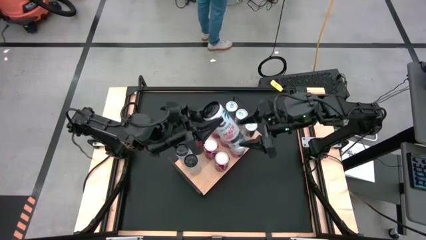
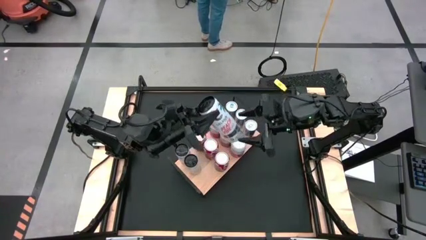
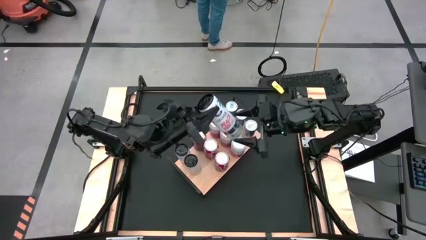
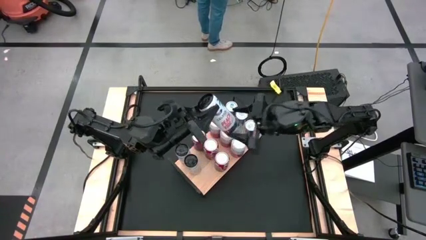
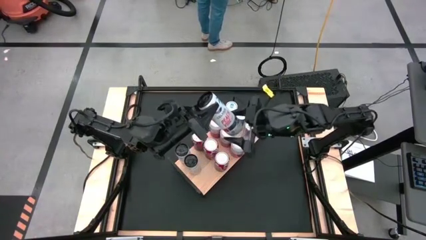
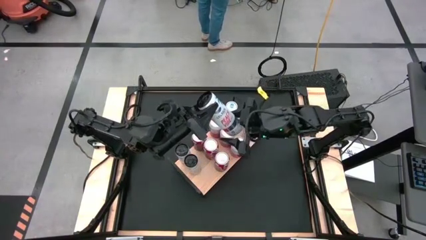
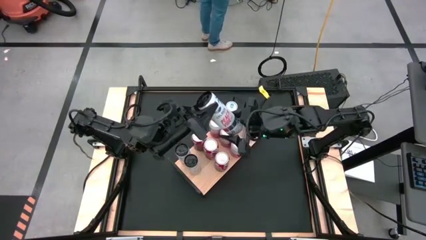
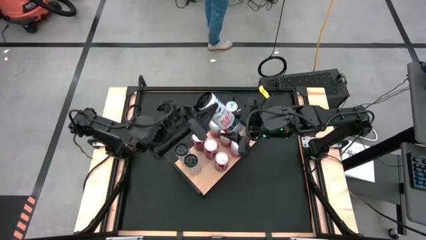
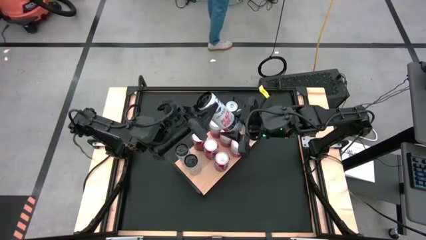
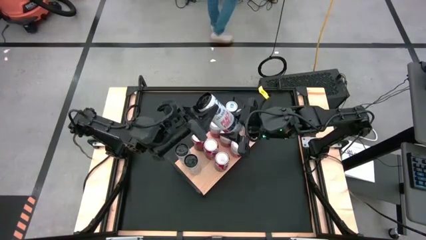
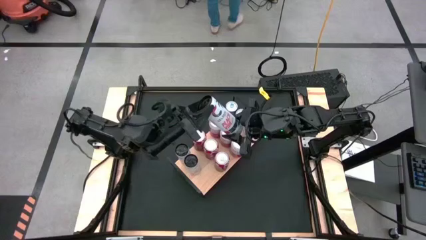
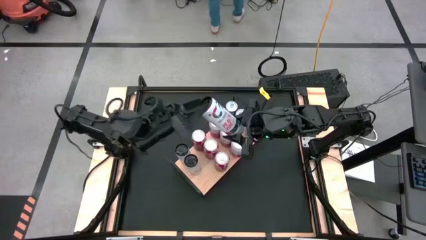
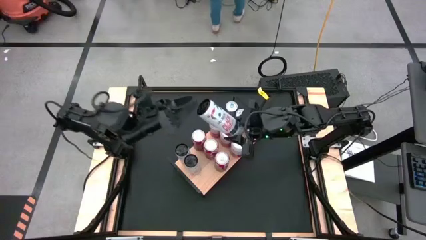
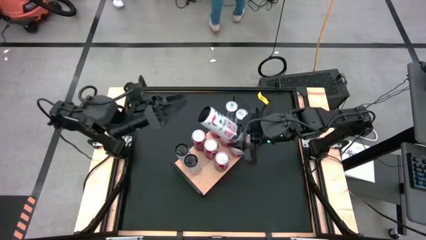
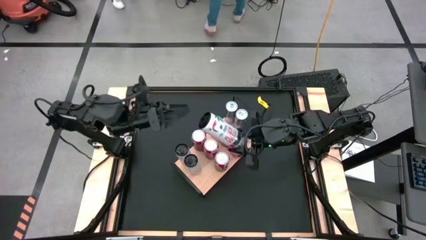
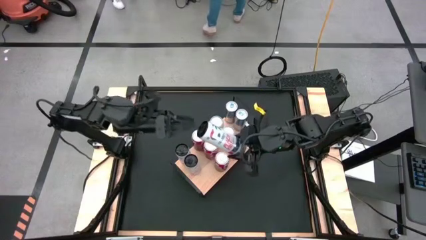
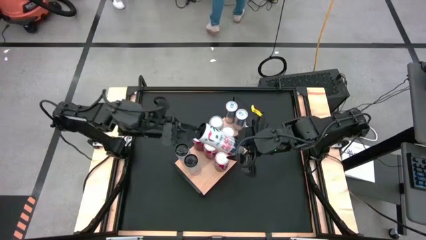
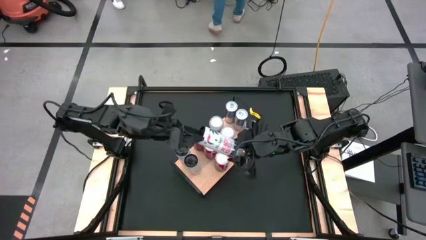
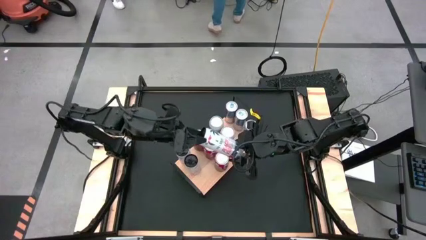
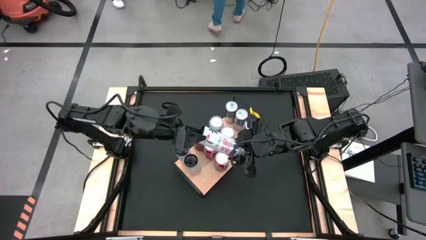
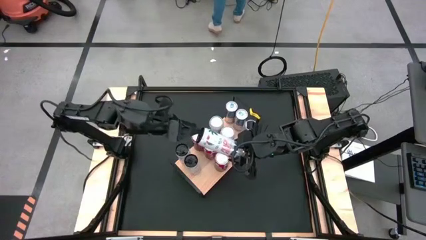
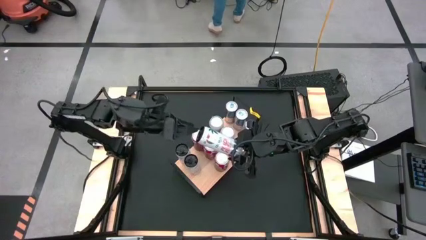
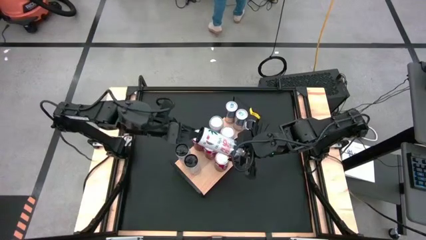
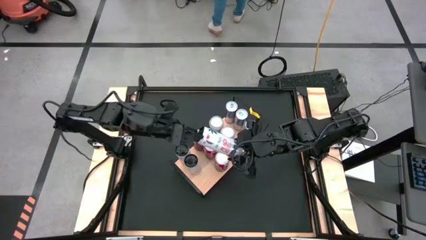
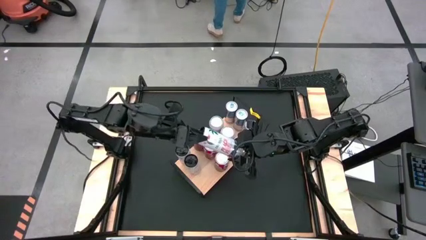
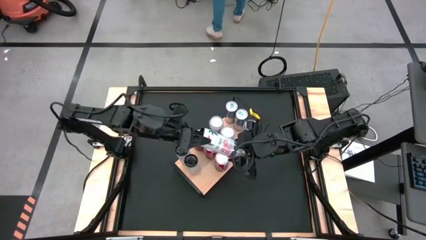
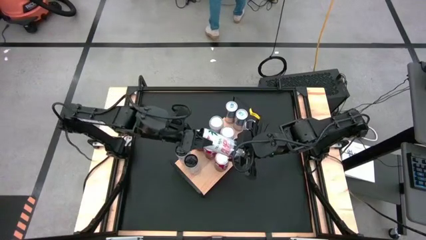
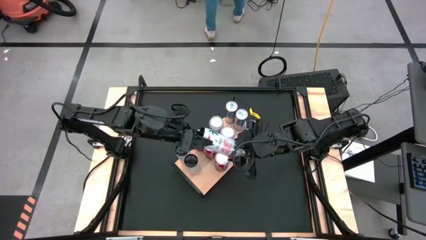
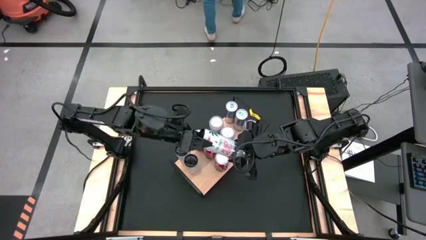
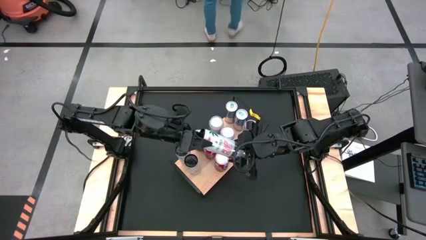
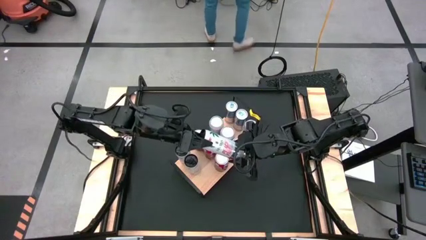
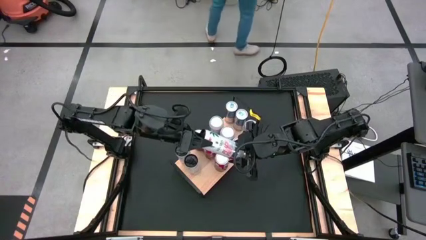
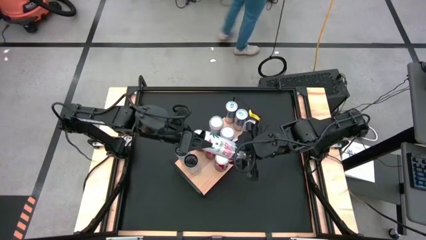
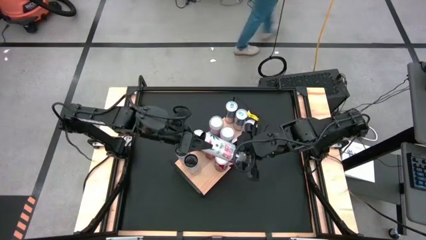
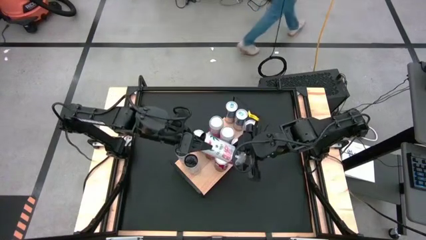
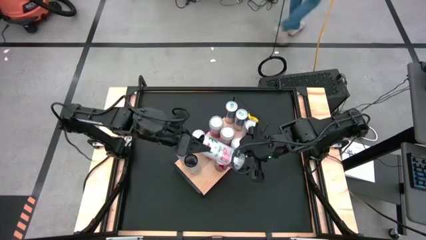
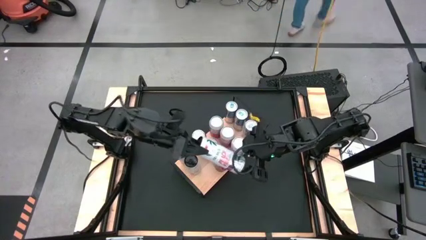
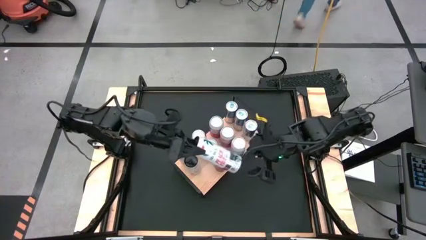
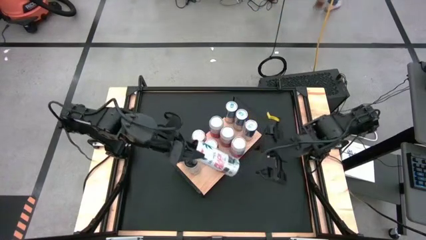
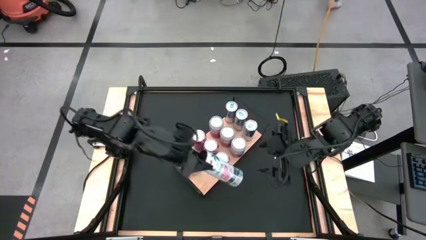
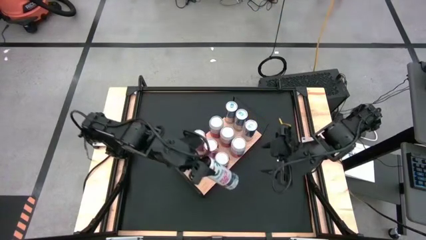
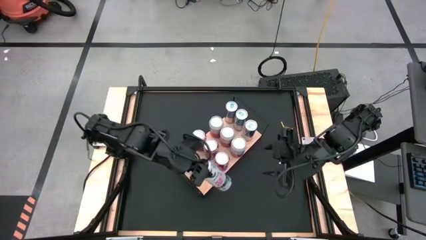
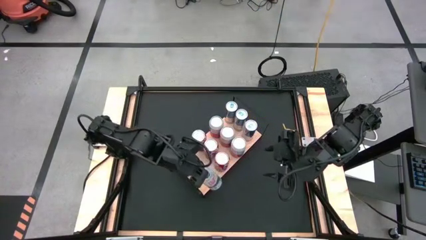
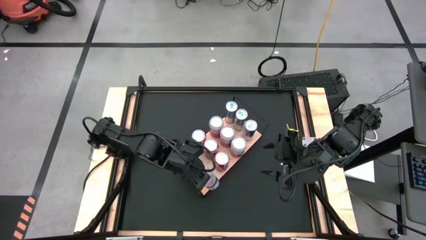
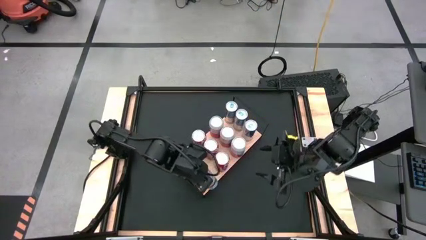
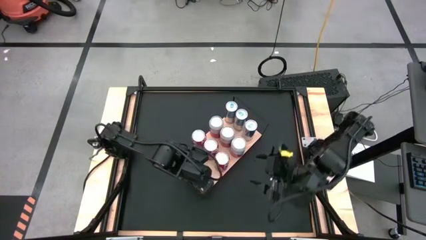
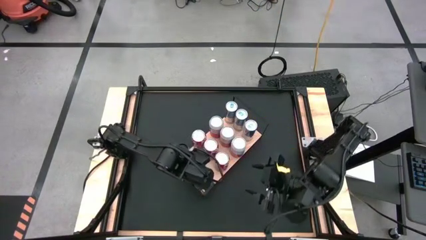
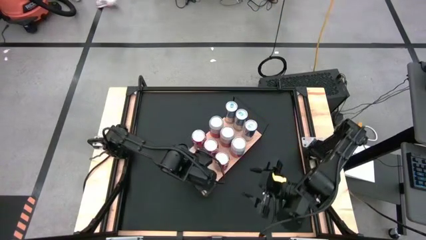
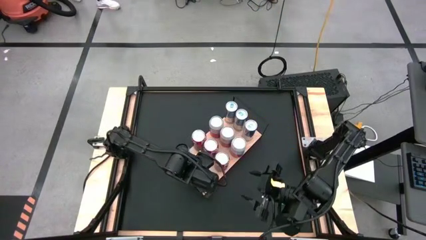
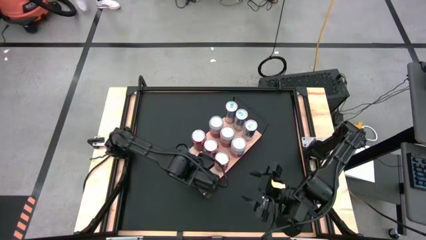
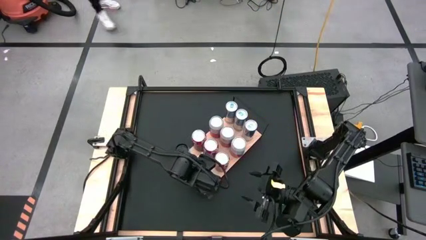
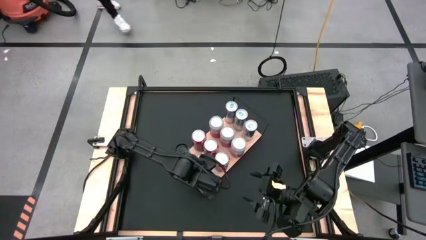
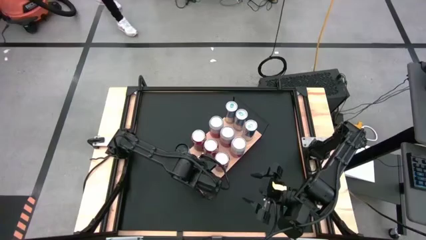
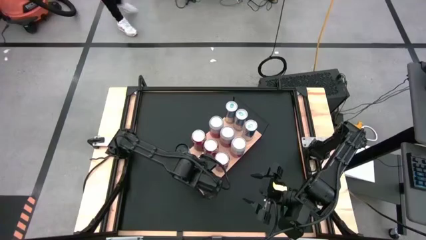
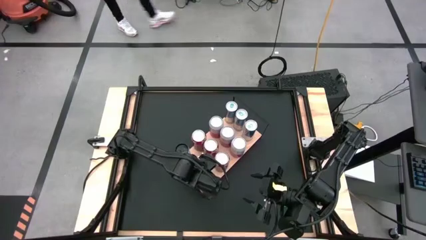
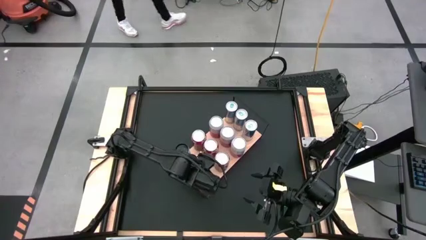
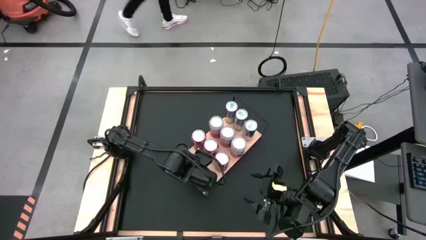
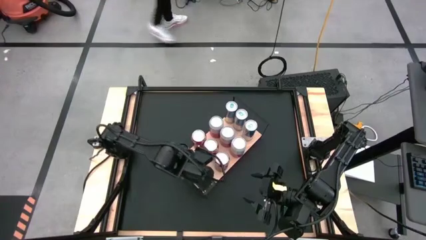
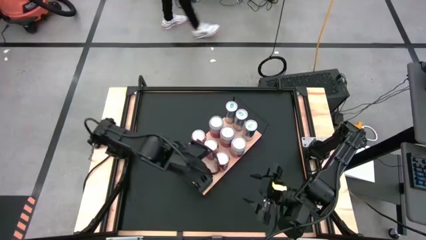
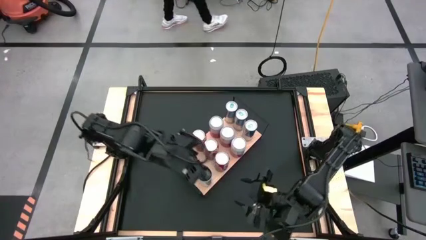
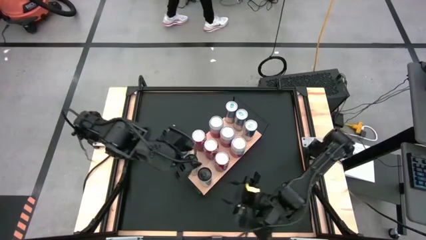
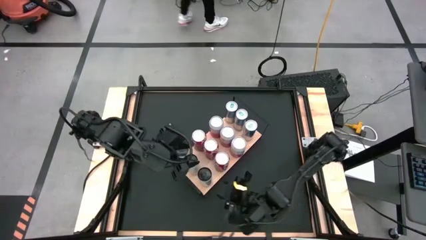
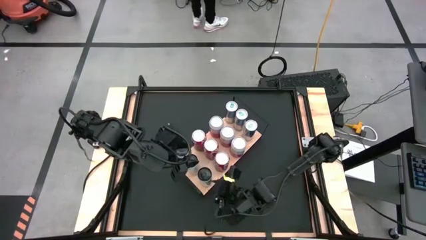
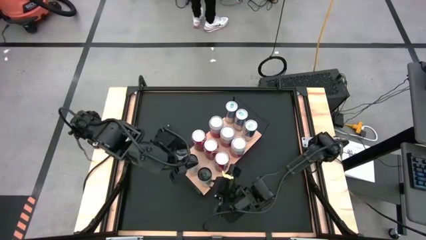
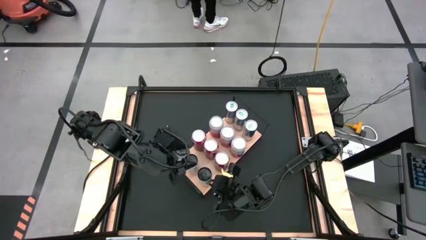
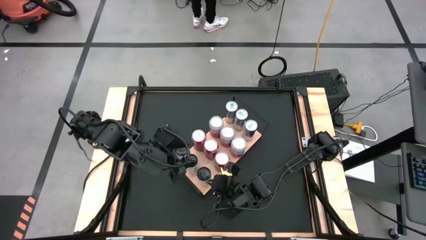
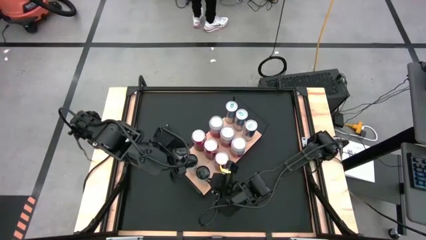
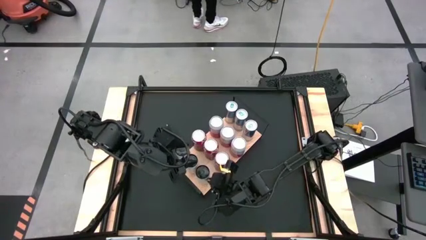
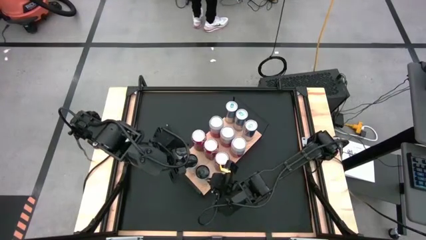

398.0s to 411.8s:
Task: Place canned beverage on shelf
Put the white pink soda can on the shelf aligned with the other white pink soda can
